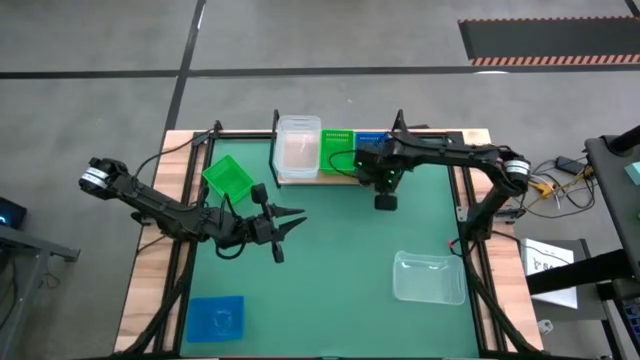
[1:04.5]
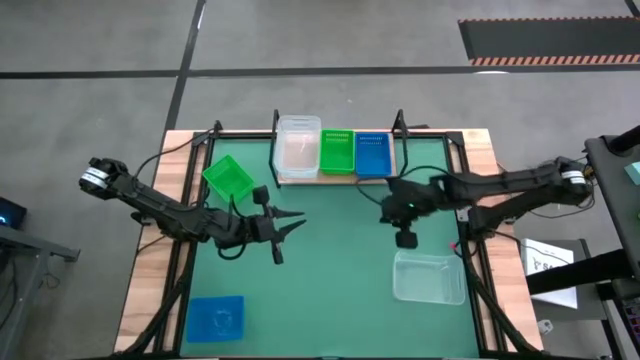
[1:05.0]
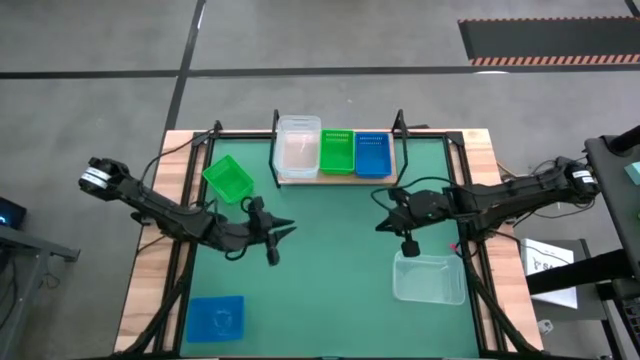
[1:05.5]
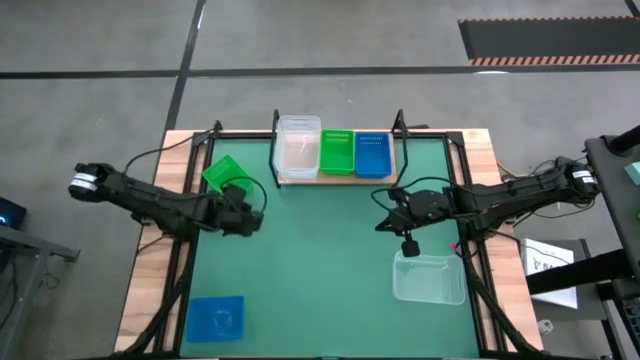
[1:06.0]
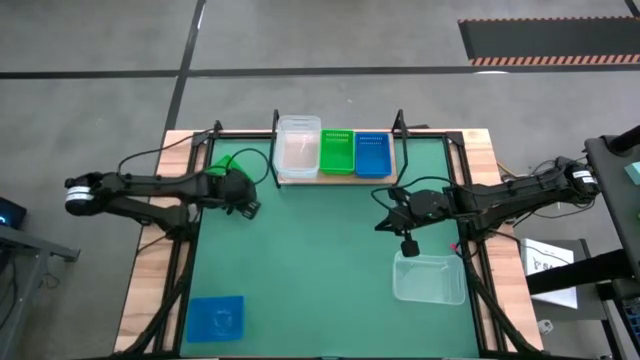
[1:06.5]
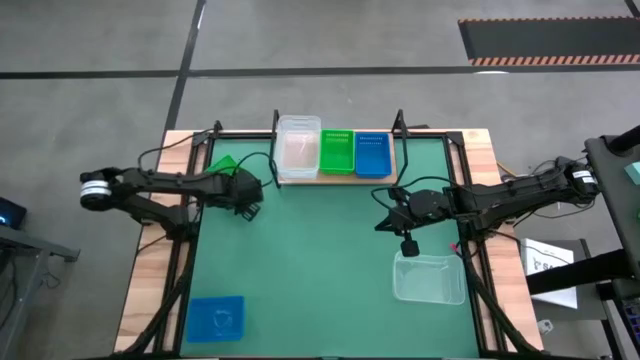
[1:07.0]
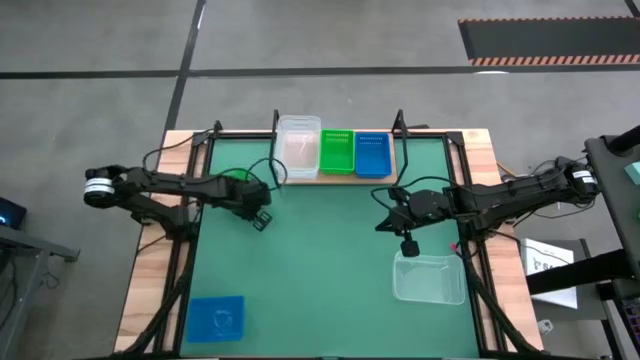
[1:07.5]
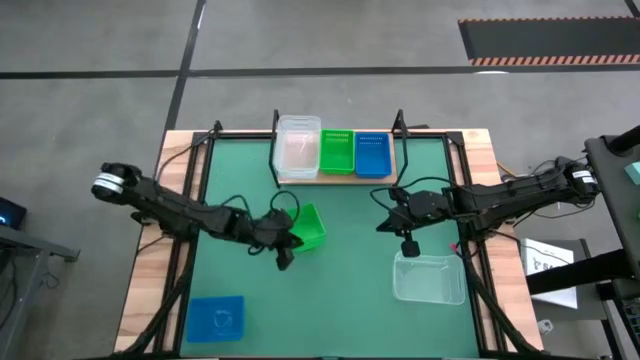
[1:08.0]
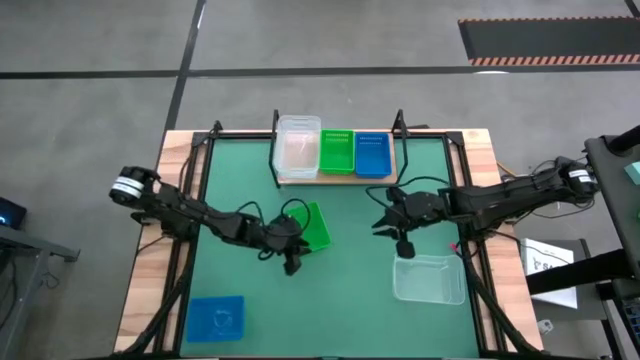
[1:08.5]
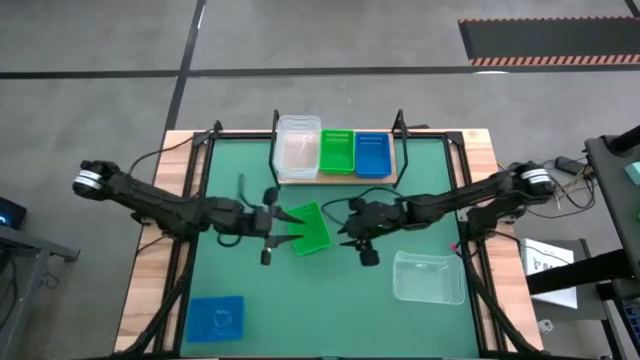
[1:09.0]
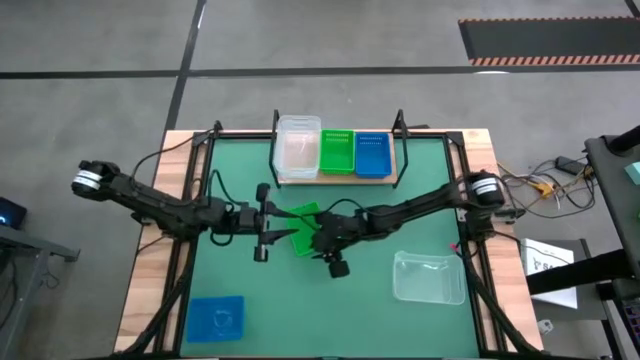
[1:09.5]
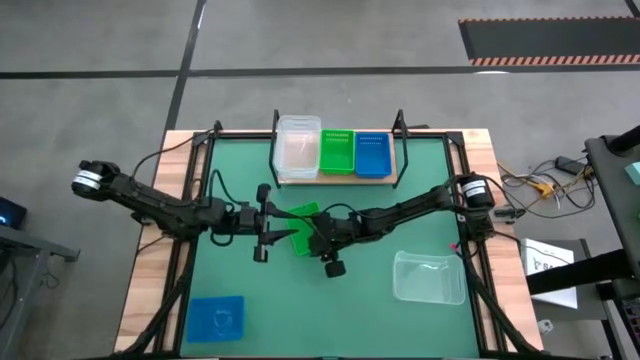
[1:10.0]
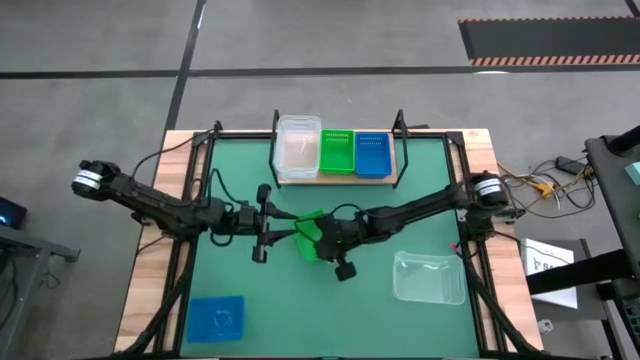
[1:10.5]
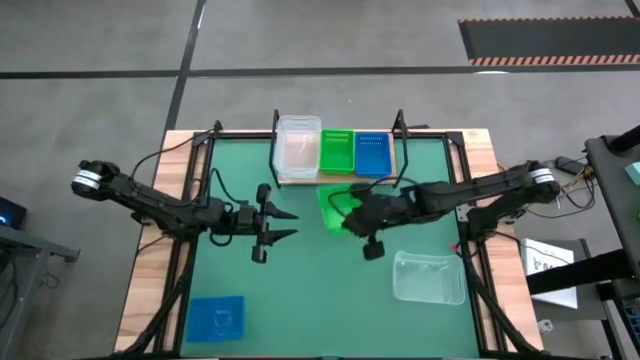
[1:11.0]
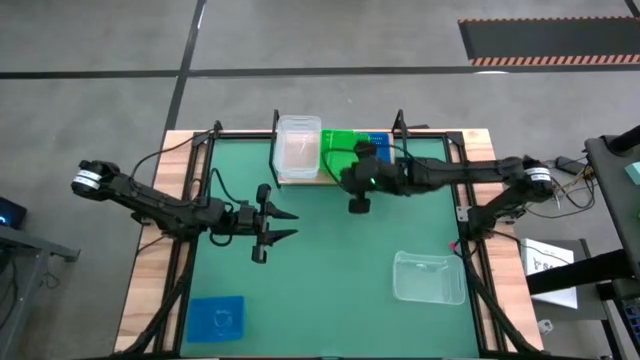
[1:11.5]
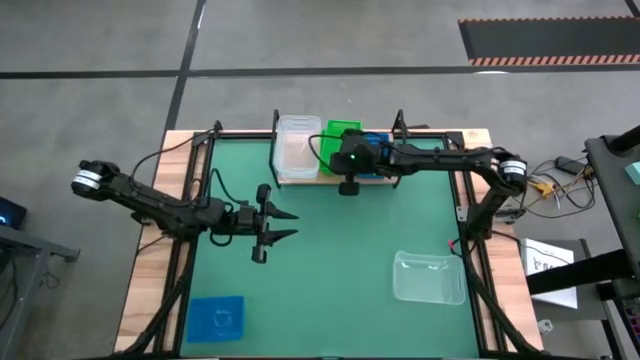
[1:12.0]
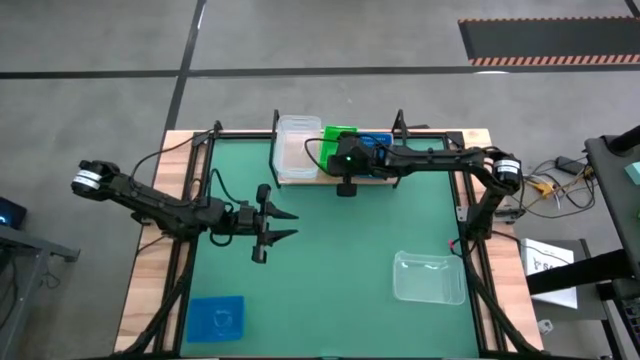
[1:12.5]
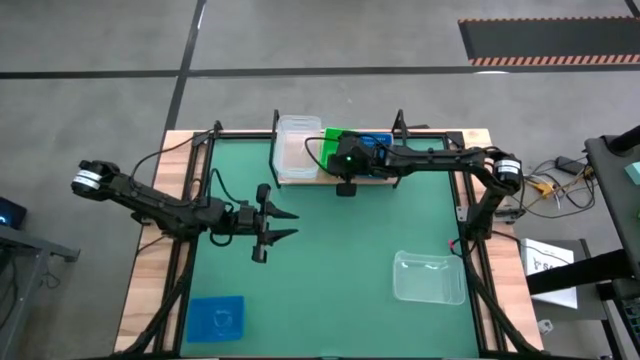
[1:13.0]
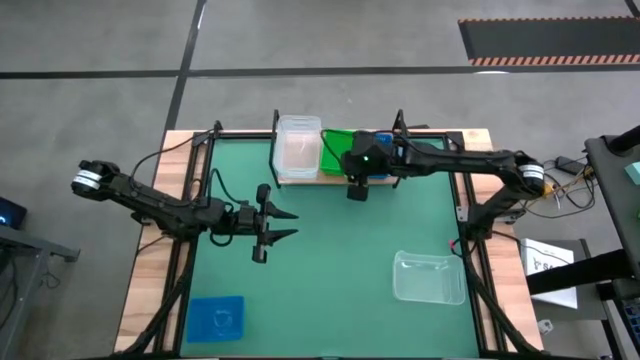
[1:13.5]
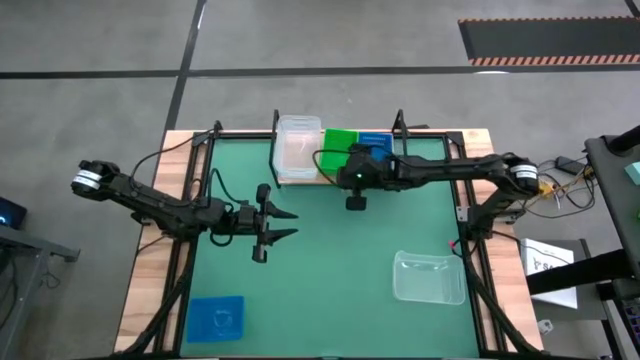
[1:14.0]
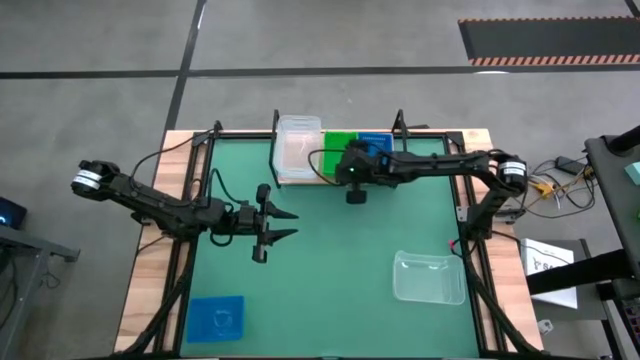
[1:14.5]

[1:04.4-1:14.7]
Task: Stack baskets on shelf by color
Stack the green bin on the green bins on the shelf

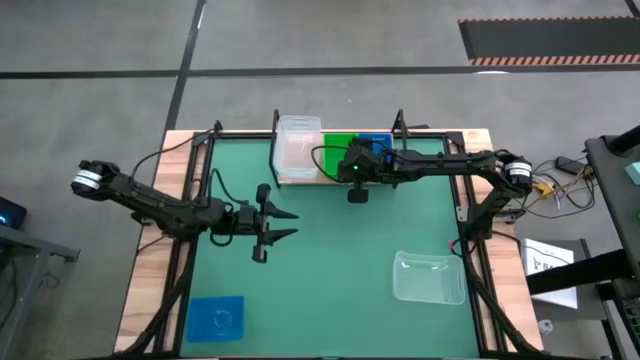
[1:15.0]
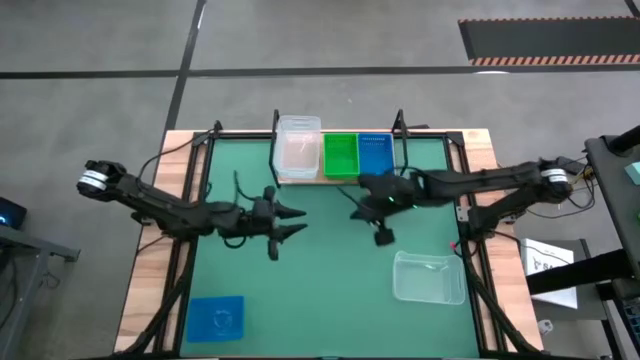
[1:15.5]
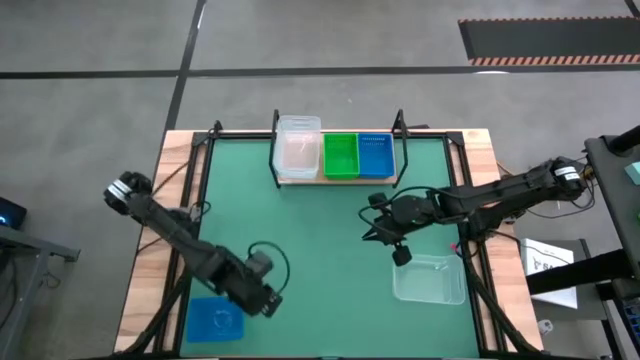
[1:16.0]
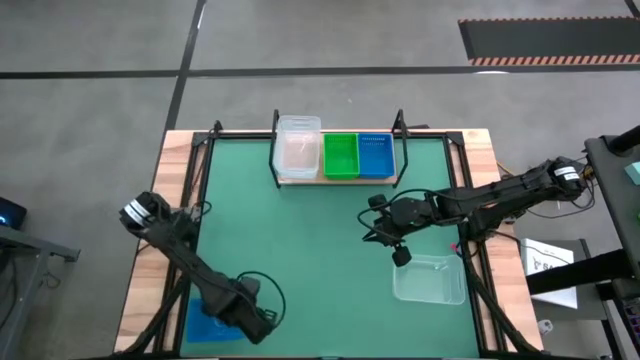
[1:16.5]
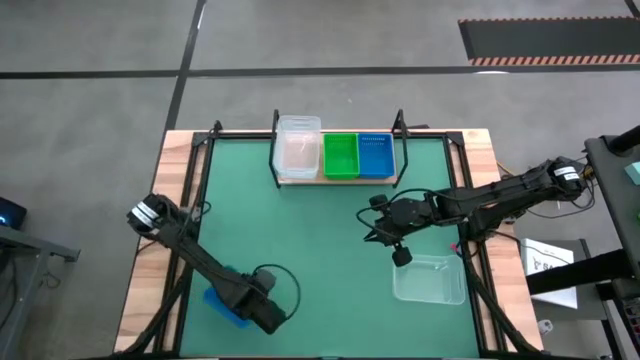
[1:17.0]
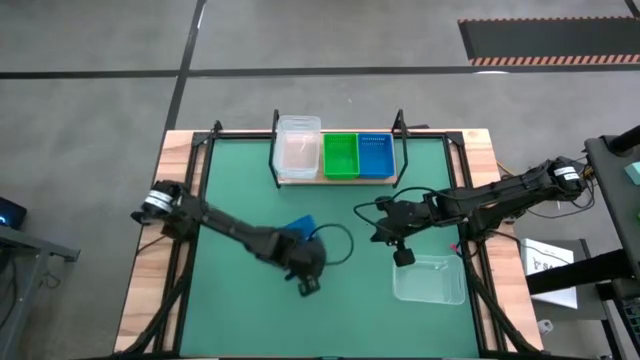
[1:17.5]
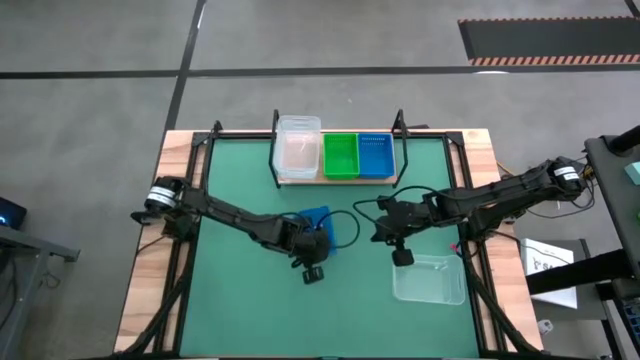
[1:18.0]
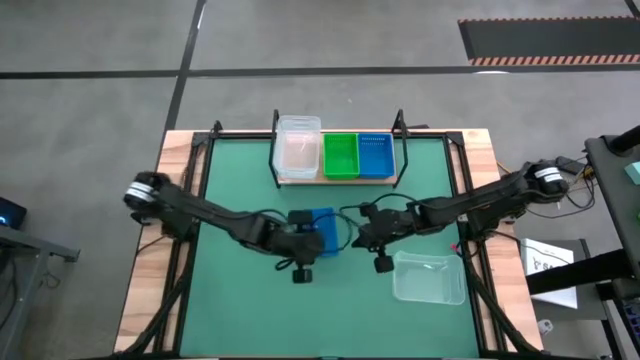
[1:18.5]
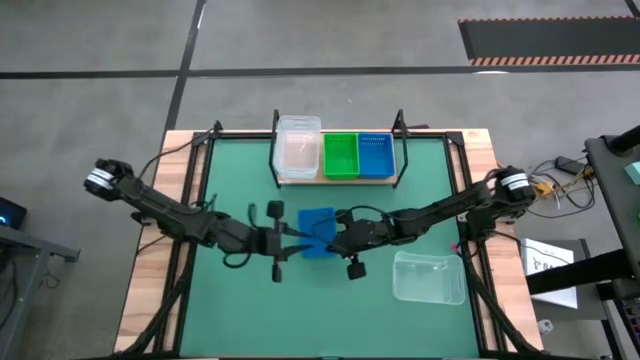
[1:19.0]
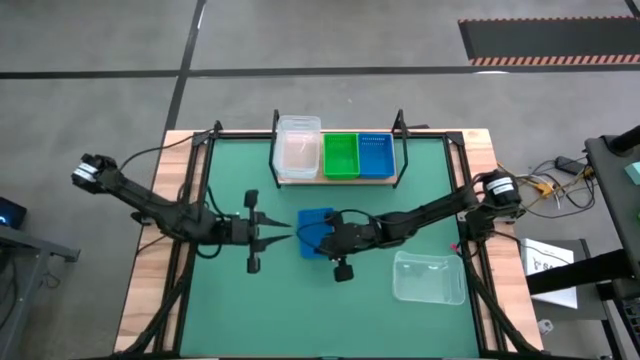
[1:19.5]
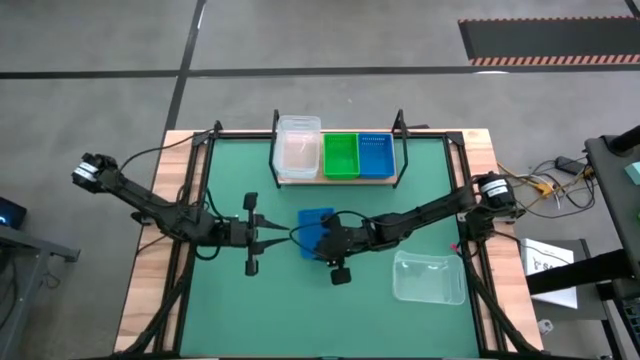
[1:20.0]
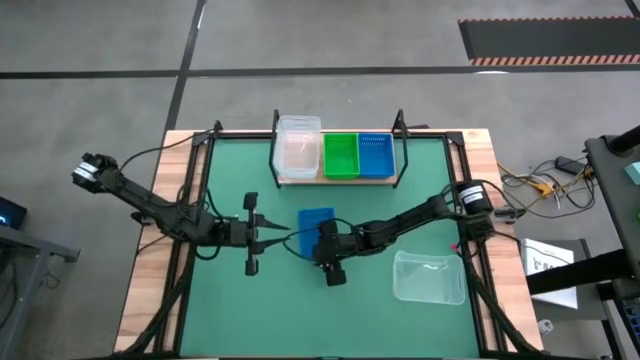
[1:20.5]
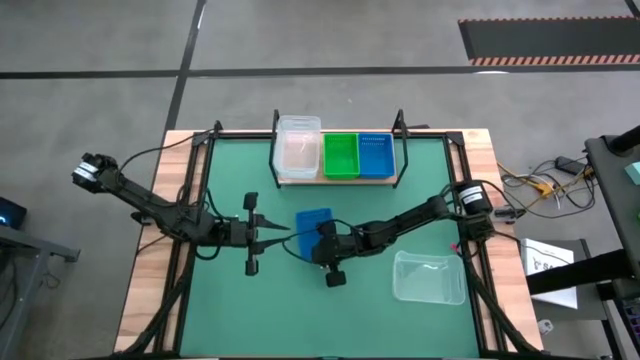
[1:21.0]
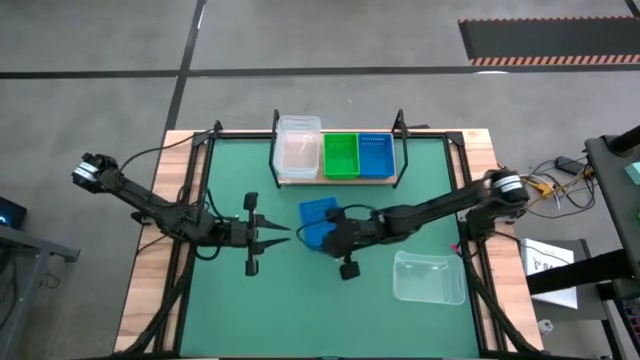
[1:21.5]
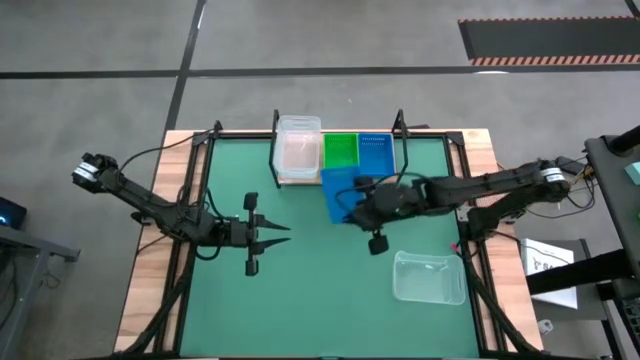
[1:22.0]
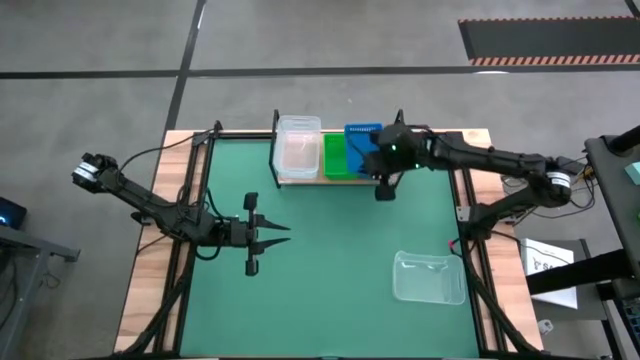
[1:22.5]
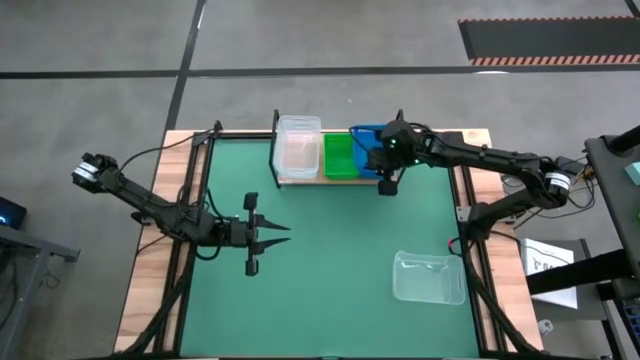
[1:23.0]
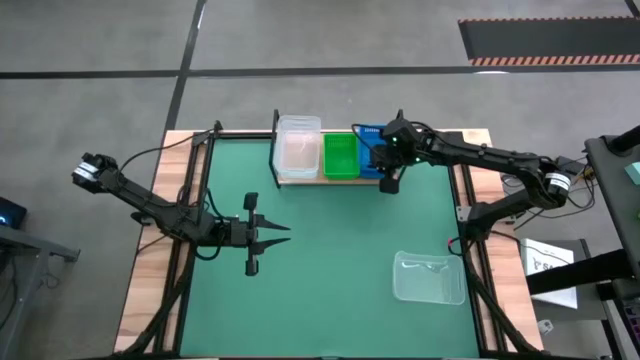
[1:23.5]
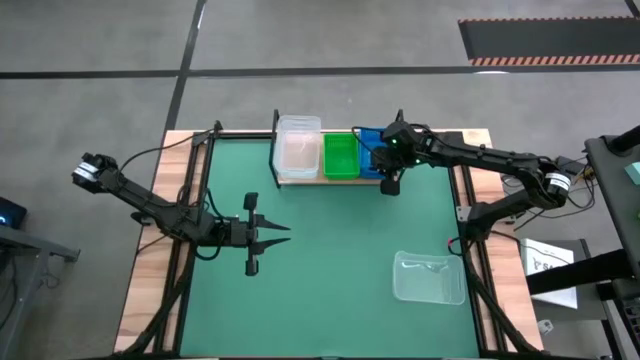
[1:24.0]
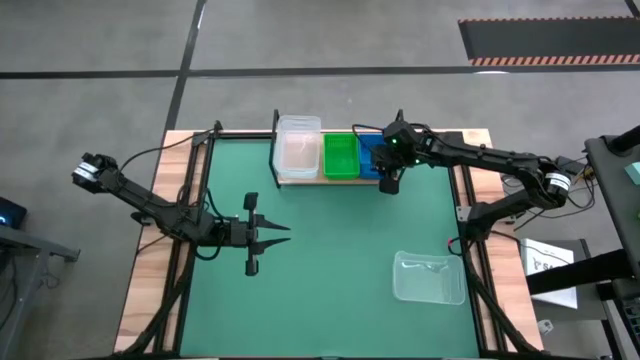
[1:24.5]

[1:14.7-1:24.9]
Stack the blue bin on the blue bins on the shelf
